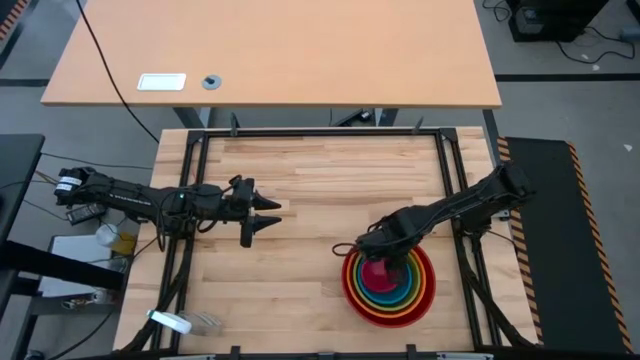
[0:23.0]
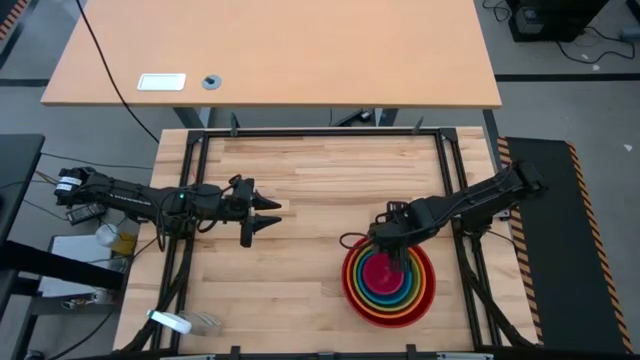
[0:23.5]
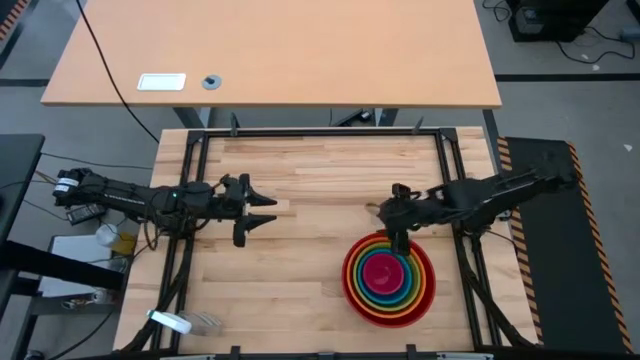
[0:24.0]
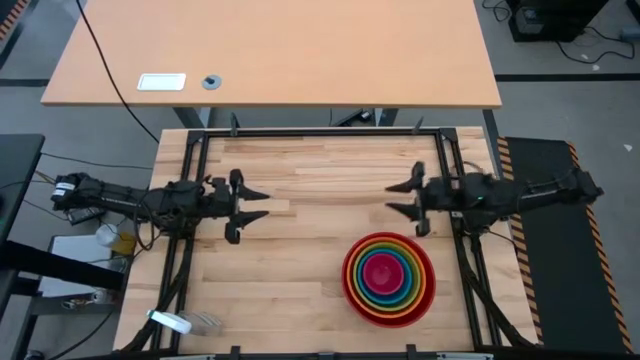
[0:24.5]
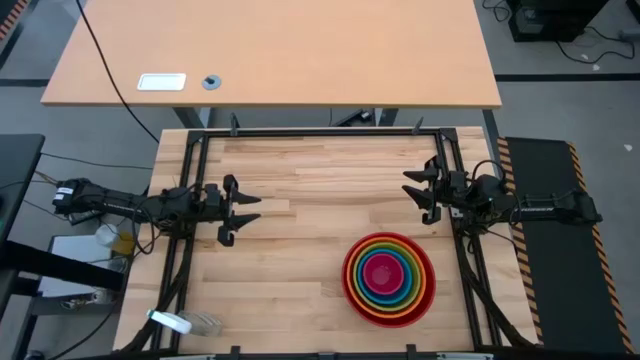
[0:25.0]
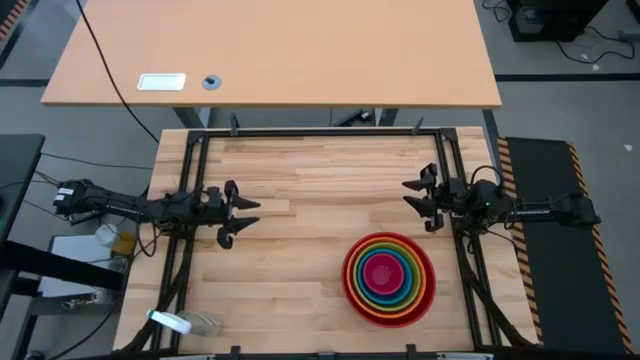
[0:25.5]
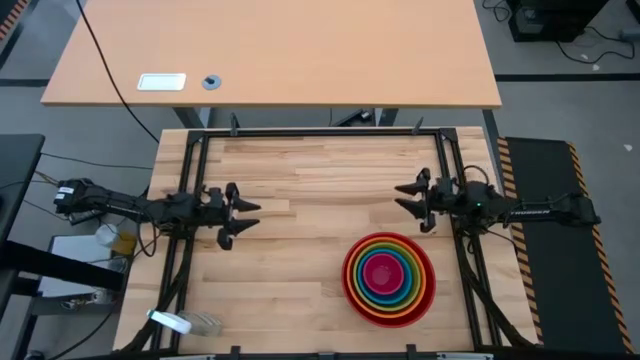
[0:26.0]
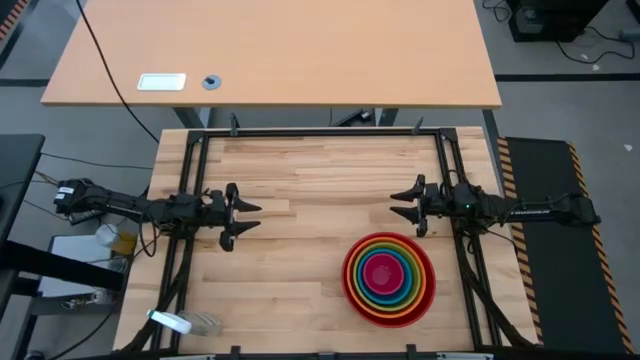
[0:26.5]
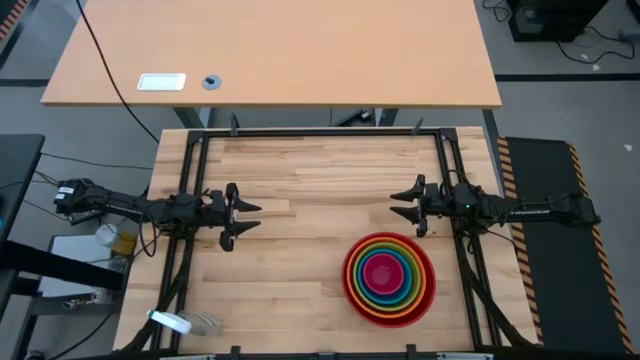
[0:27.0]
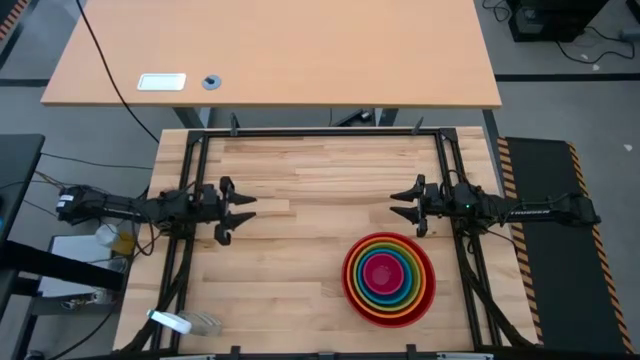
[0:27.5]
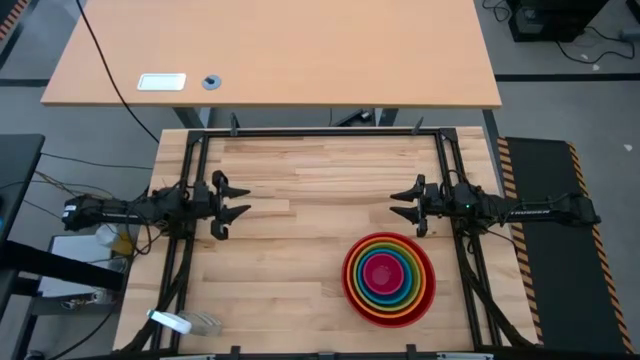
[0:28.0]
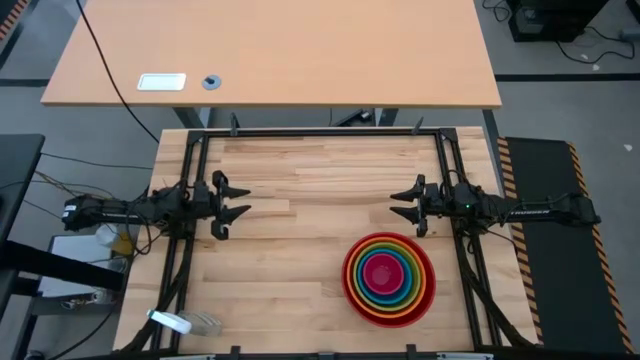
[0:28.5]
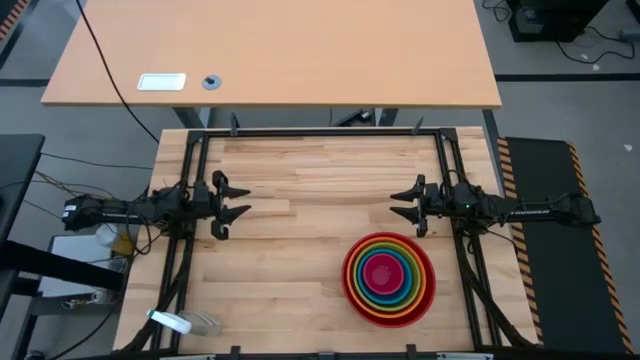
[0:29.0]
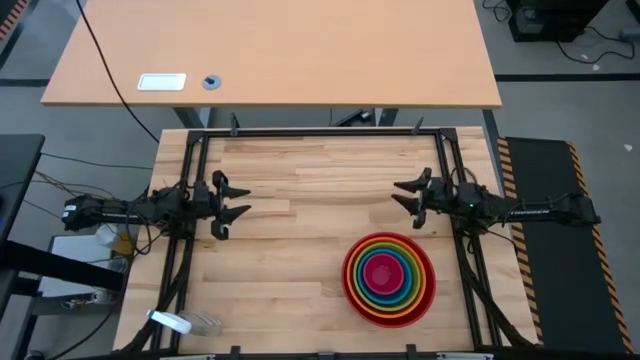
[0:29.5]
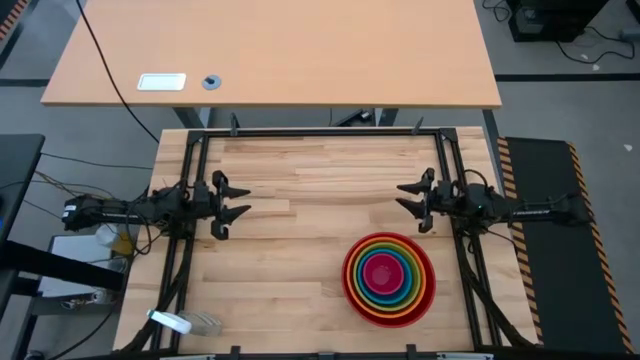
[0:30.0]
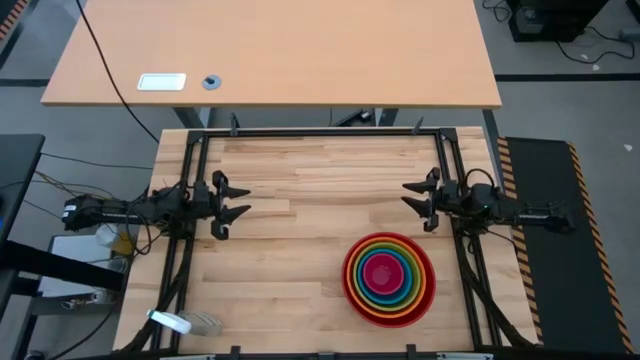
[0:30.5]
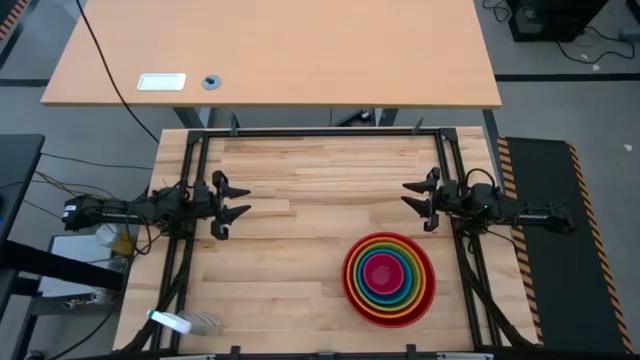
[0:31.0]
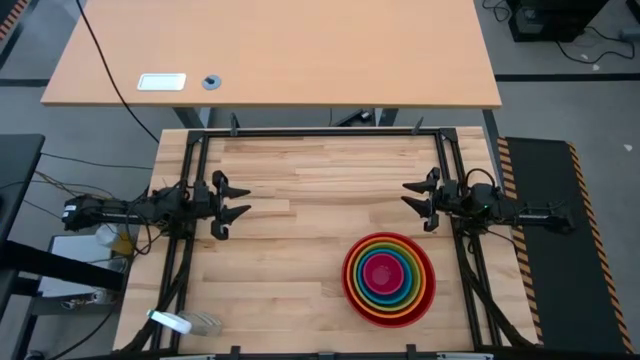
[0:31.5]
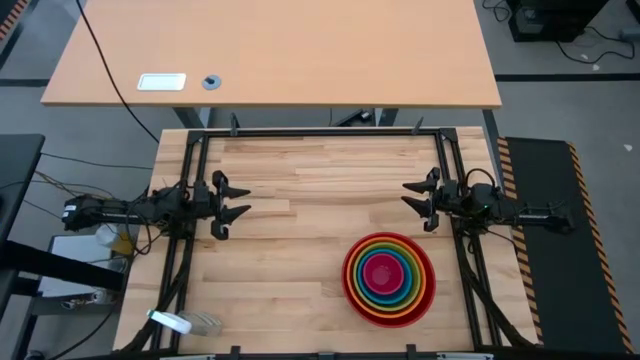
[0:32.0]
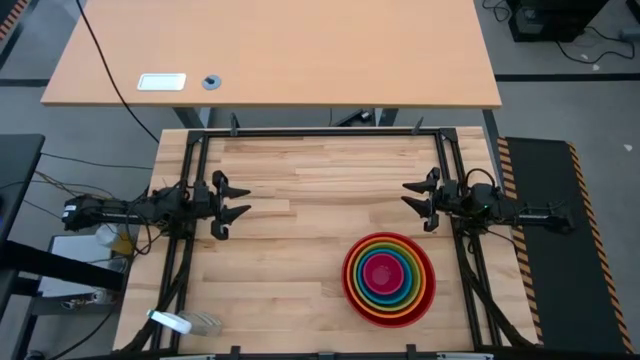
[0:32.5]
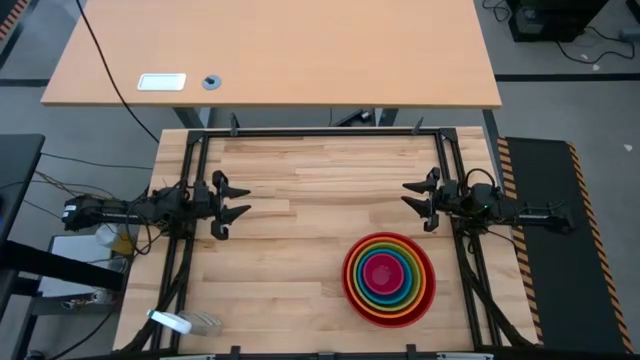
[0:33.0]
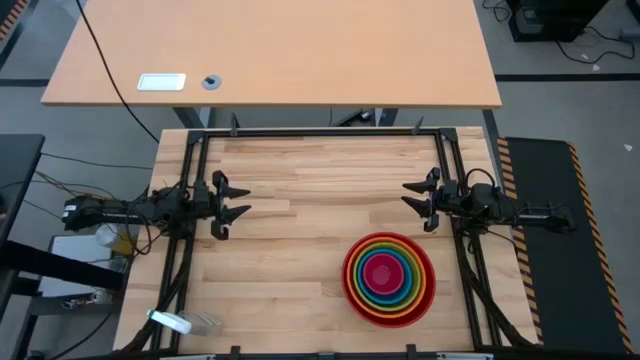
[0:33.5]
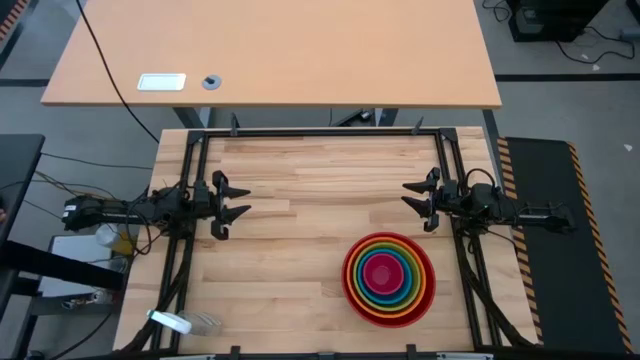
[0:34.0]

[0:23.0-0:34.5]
Return to Home Position

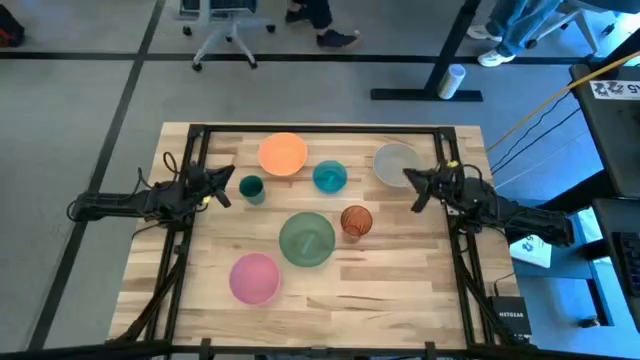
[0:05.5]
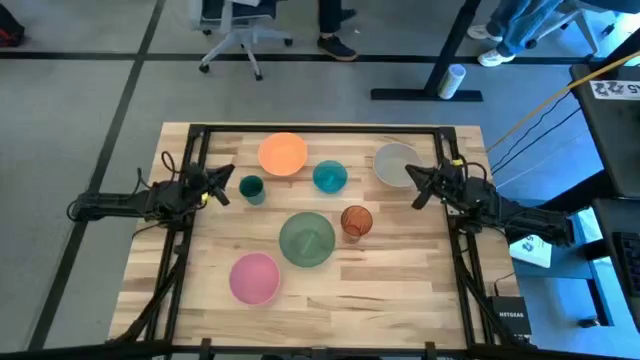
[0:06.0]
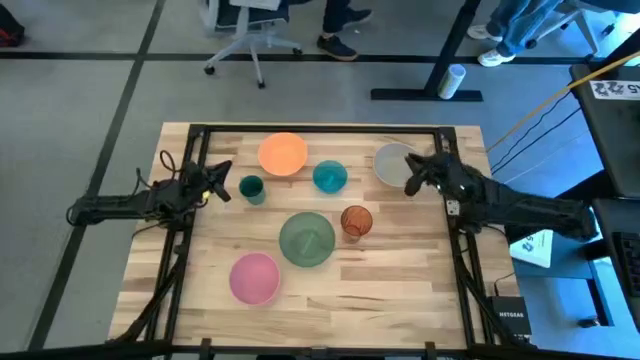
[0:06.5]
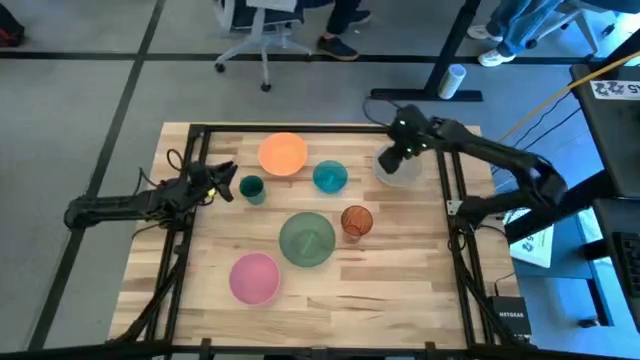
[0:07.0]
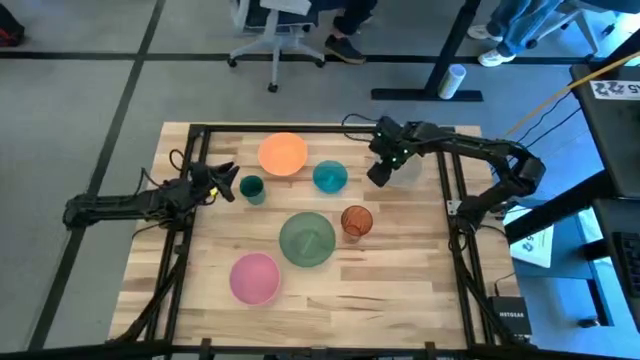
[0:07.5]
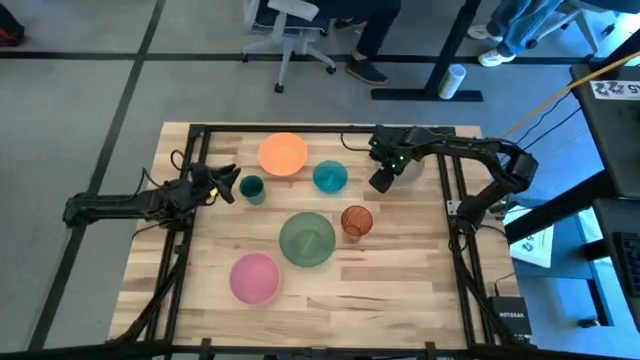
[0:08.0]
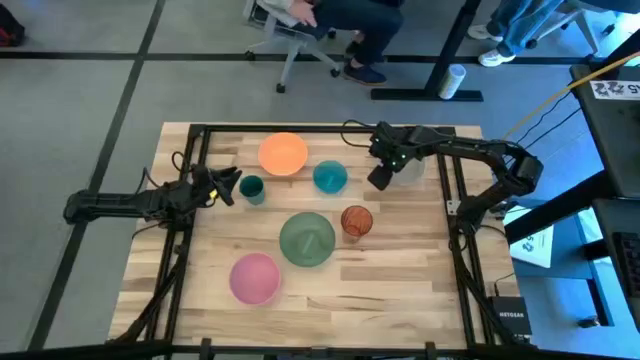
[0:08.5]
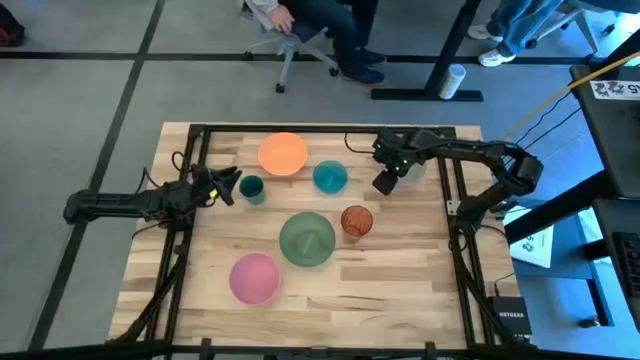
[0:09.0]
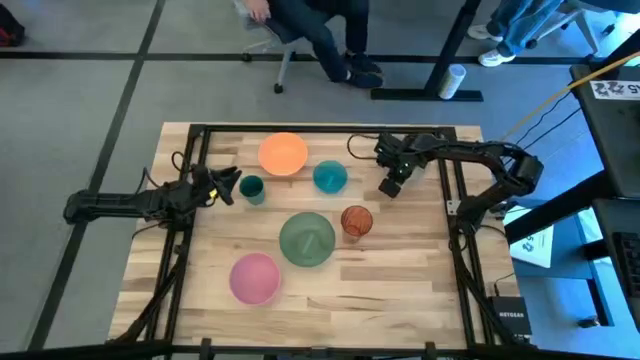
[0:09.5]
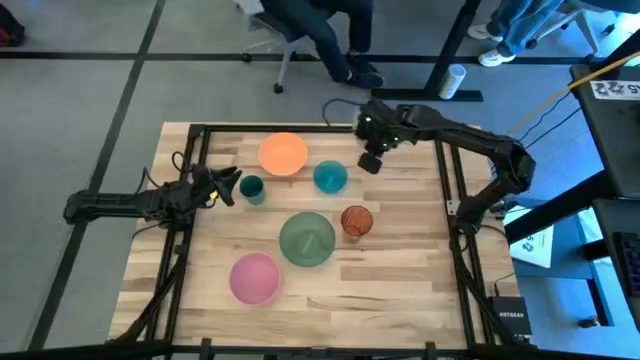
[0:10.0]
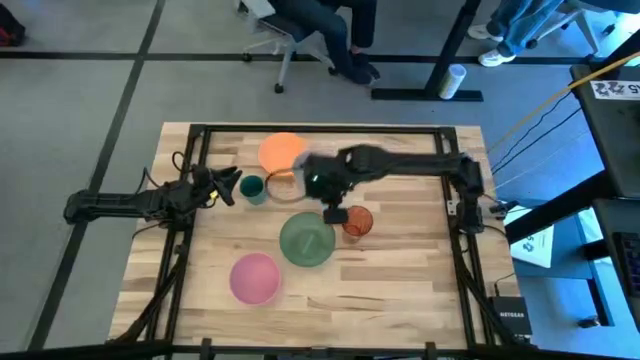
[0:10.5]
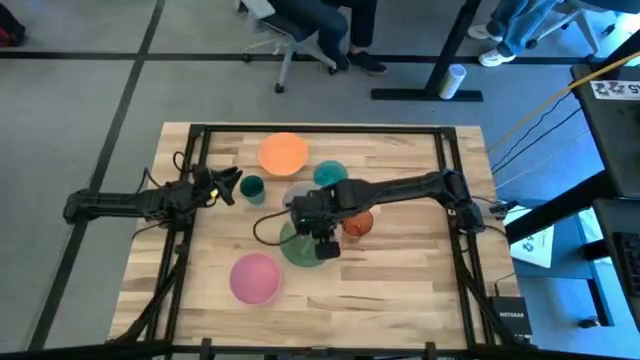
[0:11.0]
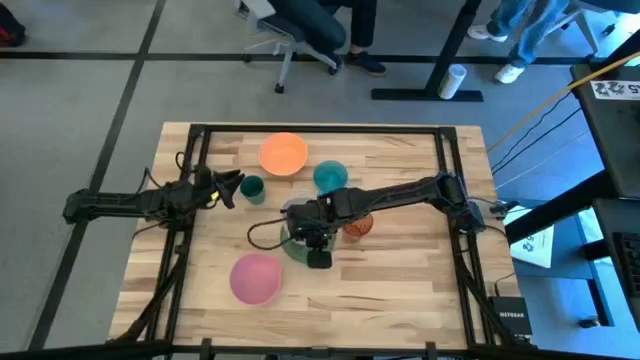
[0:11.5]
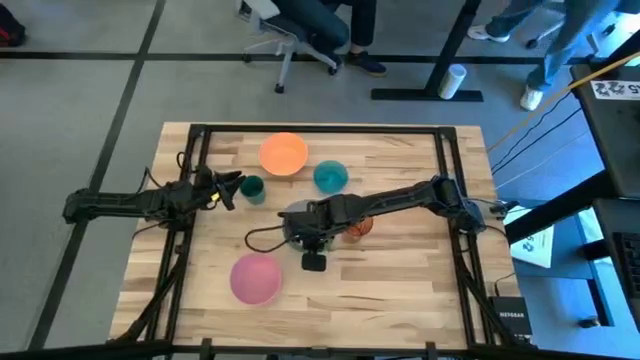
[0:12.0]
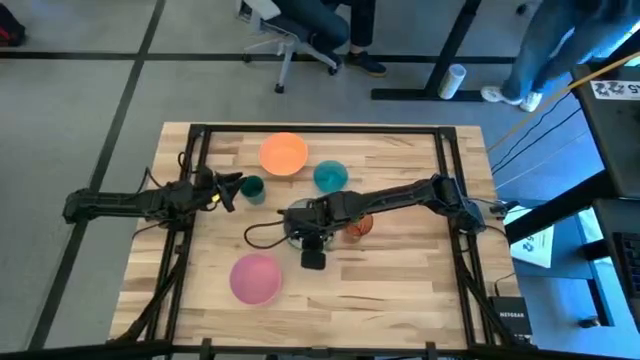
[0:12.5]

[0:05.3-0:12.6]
Stack the gray bowl on top of the green bowl

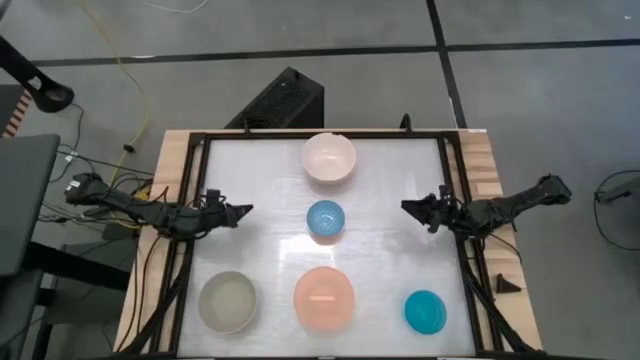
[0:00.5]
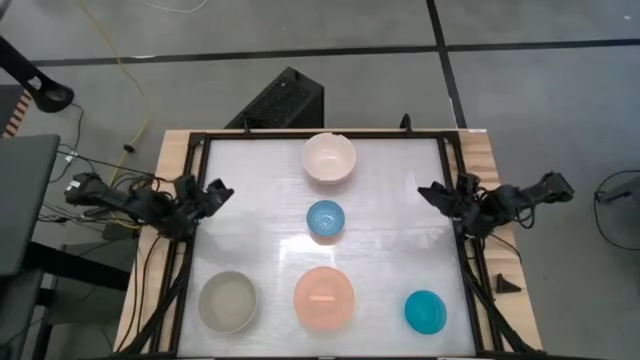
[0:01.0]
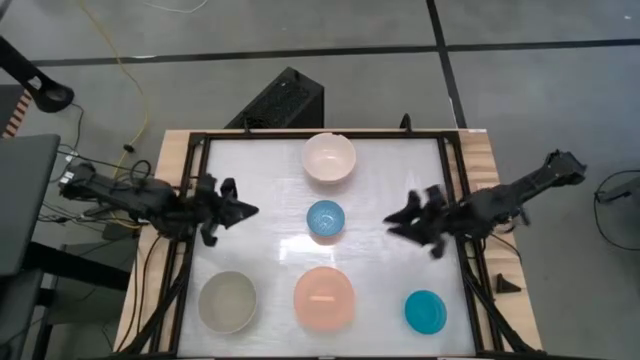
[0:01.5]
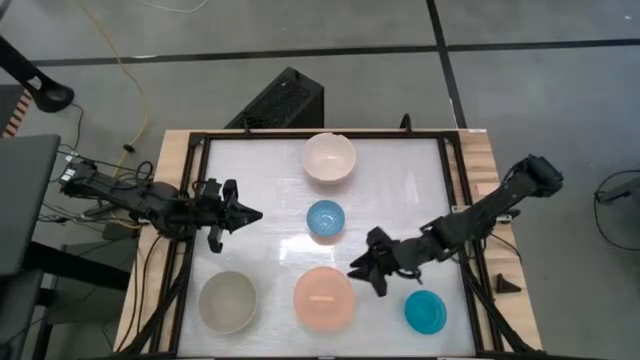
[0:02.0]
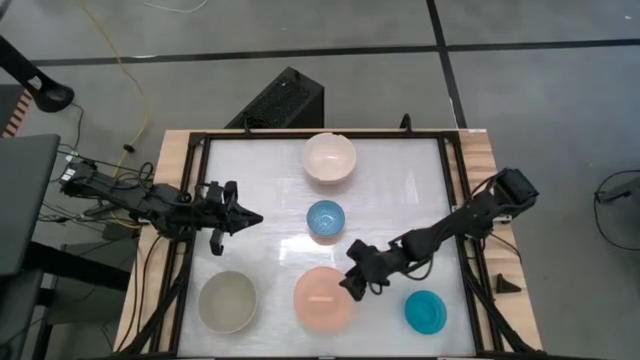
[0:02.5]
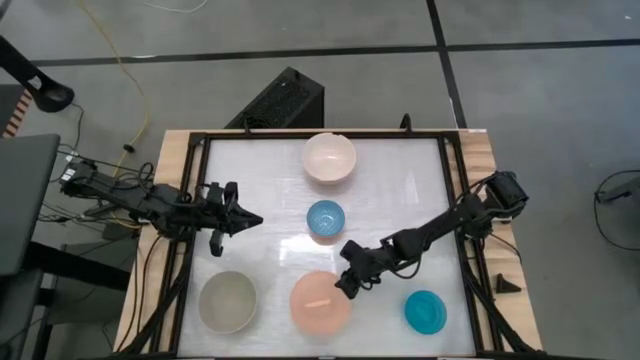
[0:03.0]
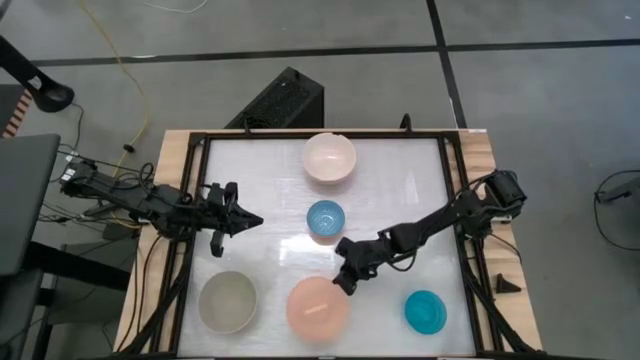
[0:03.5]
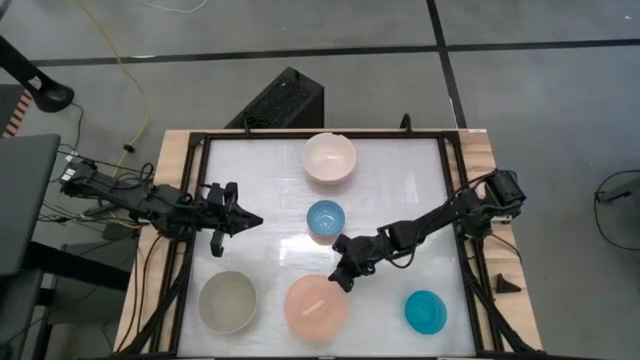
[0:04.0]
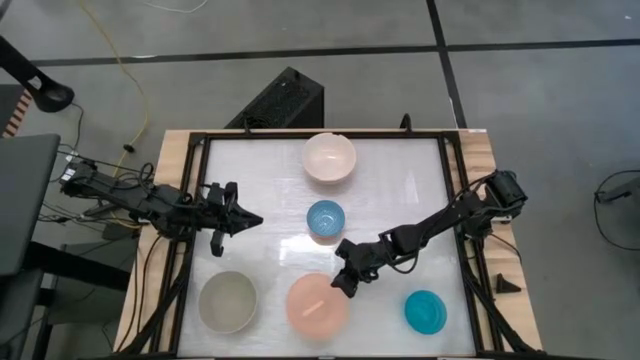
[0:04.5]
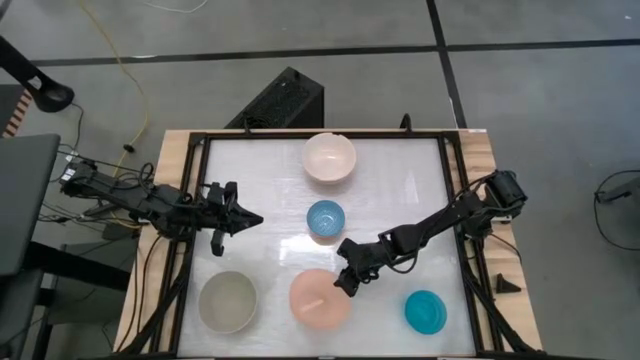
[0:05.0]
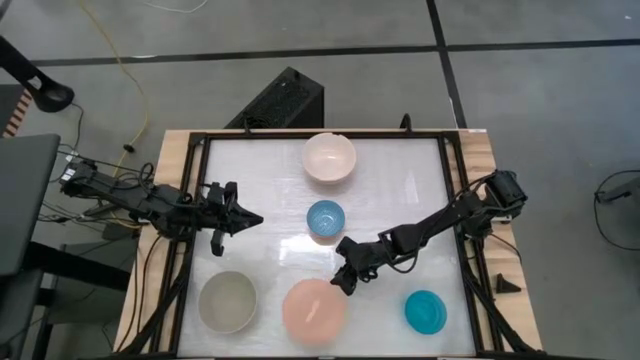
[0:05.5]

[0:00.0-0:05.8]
Stack the orange bowl on top of the white bowl
